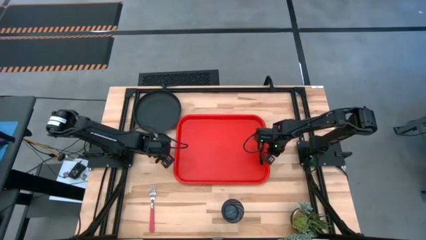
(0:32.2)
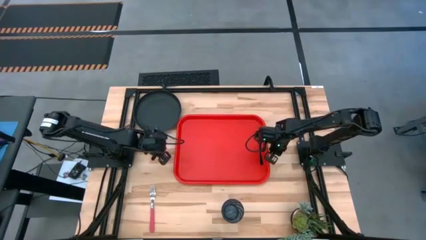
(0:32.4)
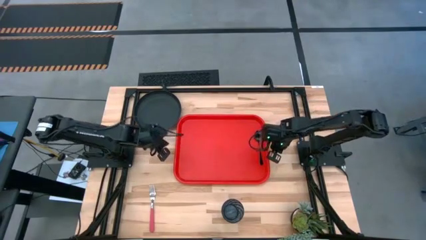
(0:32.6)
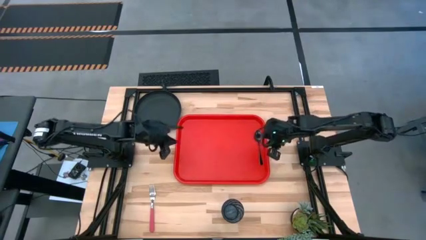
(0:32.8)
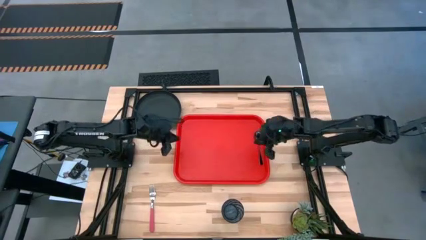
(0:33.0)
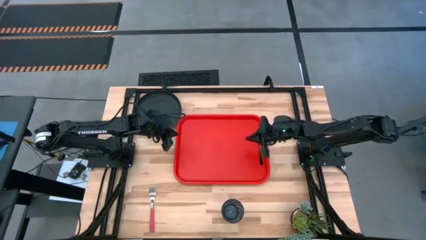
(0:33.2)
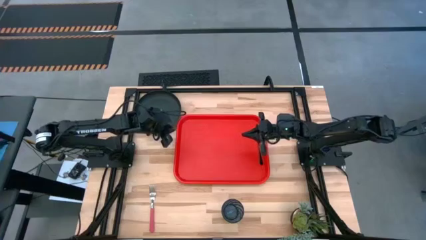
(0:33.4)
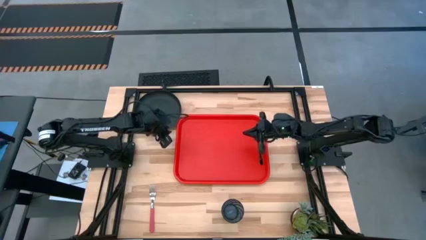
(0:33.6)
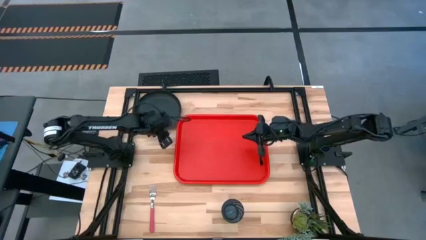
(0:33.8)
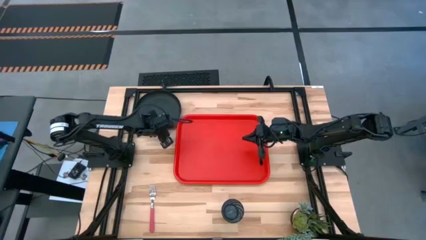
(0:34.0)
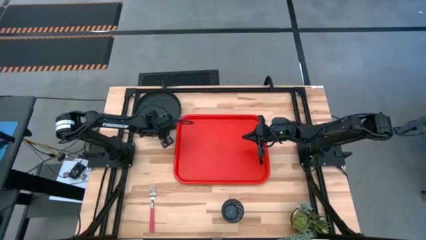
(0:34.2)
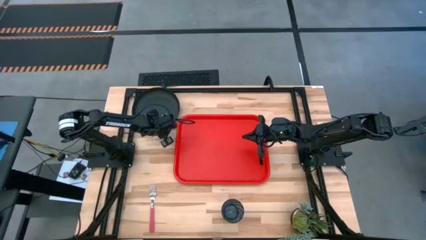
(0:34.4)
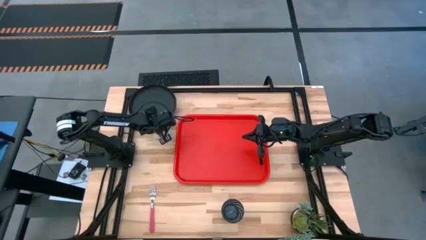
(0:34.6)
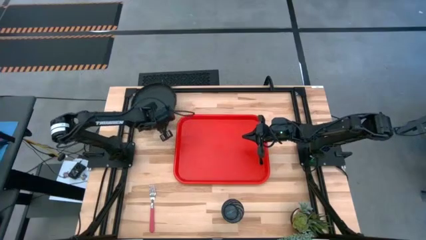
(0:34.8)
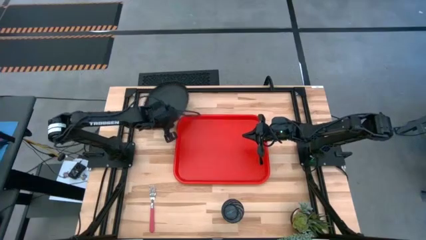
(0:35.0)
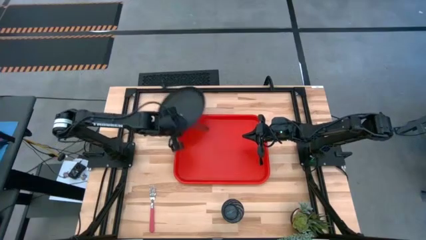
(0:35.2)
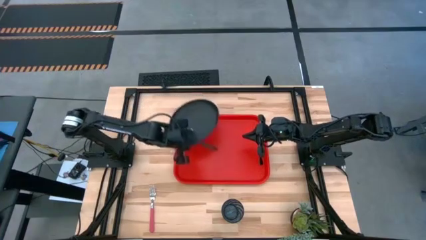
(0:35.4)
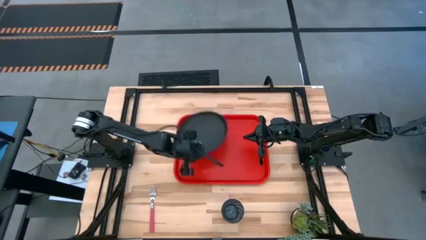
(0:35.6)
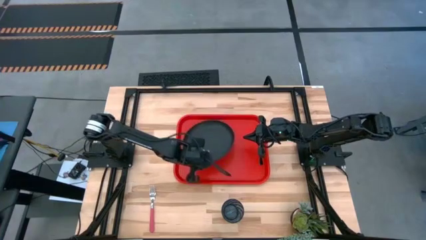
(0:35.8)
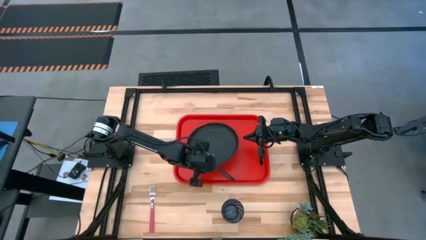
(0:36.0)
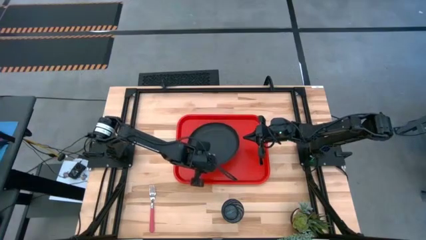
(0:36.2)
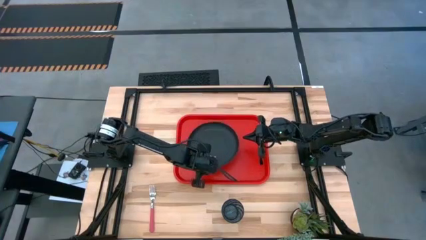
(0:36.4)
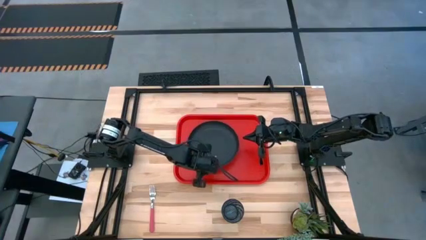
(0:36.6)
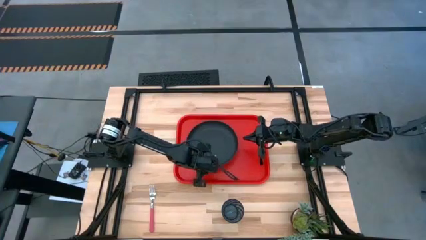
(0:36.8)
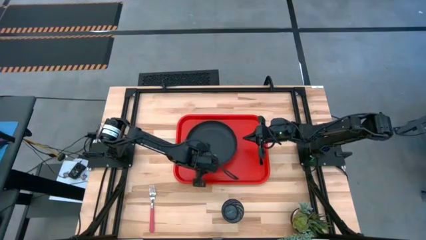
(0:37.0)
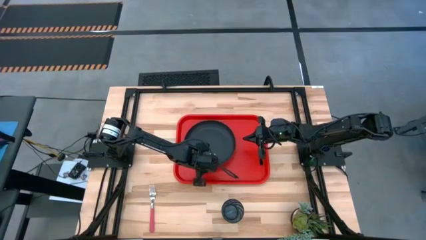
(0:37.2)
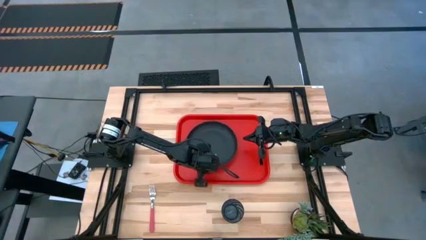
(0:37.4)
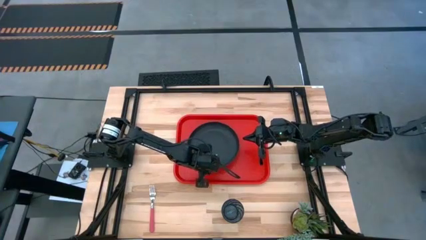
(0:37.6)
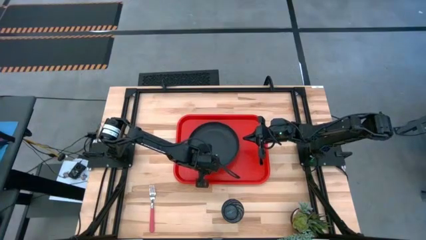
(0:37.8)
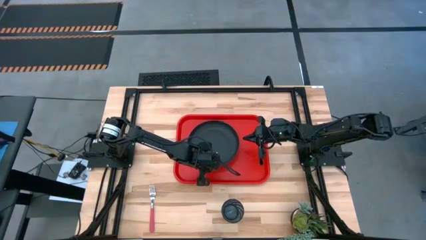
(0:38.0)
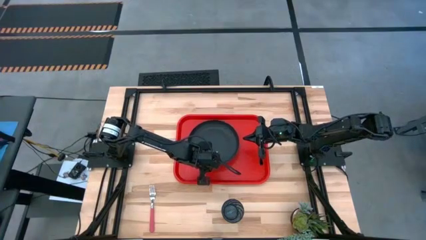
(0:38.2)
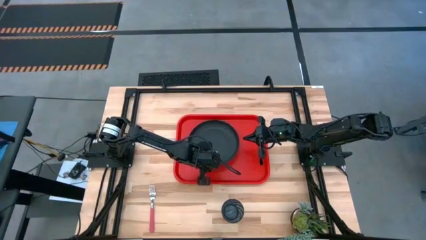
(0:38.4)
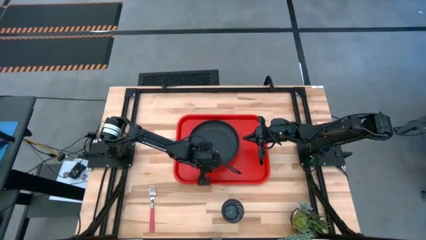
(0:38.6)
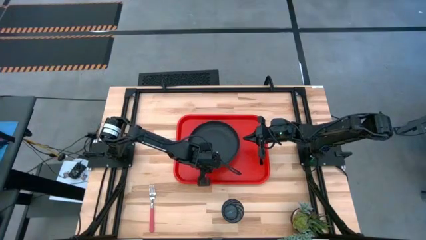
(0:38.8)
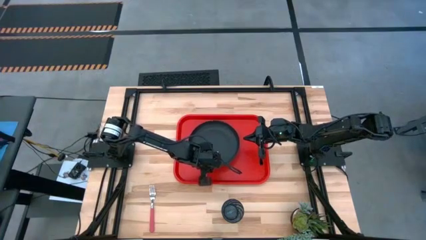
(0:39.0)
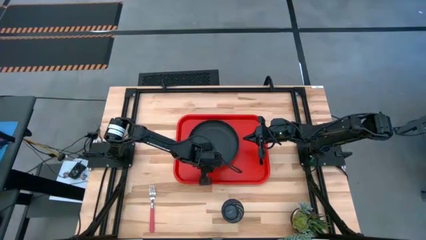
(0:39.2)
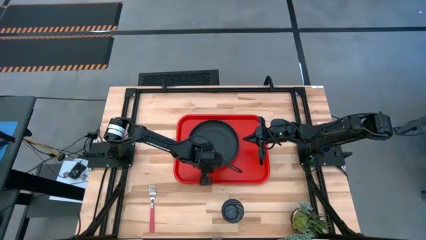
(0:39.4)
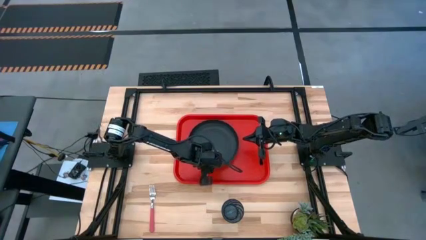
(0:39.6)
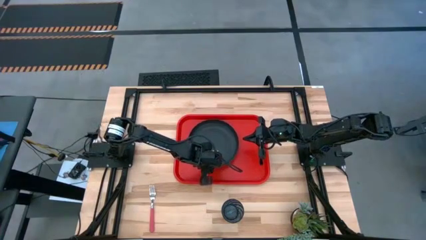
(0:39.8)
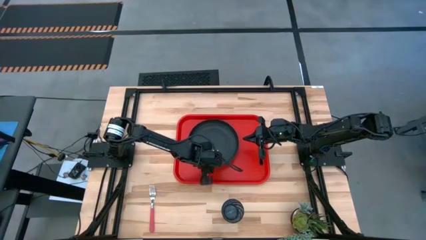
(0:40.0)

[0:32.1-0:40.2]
Task: Pick and place plate/cup/fork/spoon on tray
Put the black plate in the center of the red serving tray

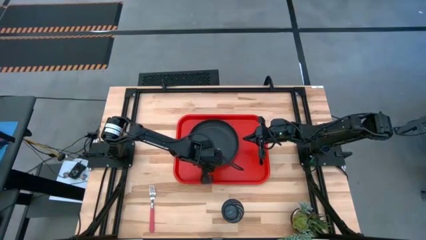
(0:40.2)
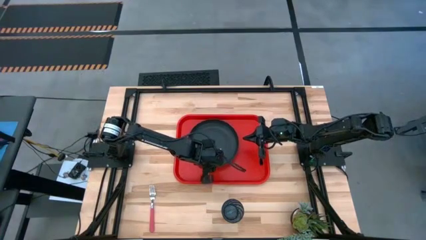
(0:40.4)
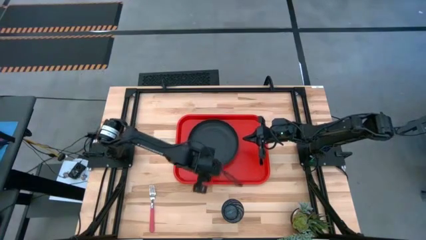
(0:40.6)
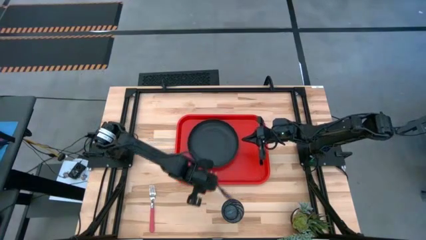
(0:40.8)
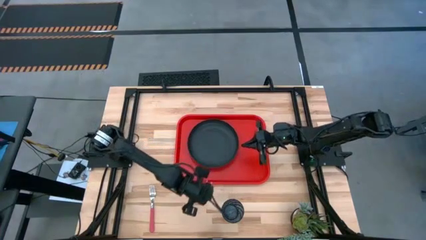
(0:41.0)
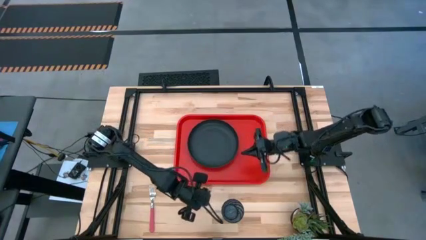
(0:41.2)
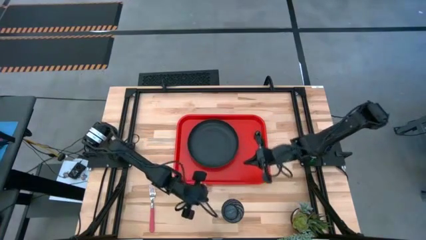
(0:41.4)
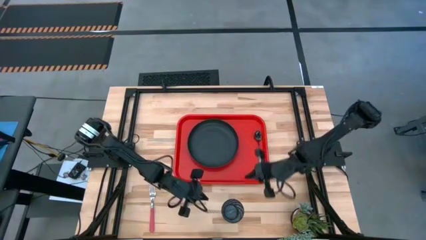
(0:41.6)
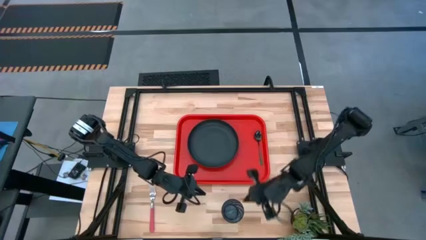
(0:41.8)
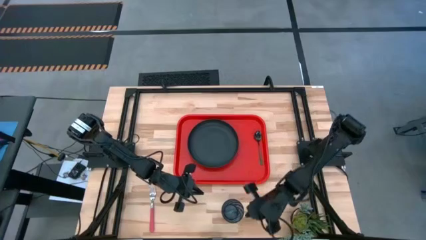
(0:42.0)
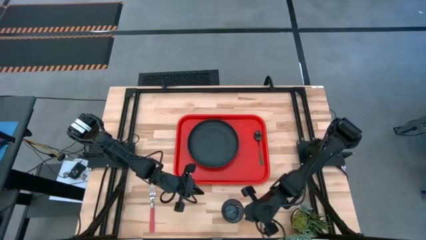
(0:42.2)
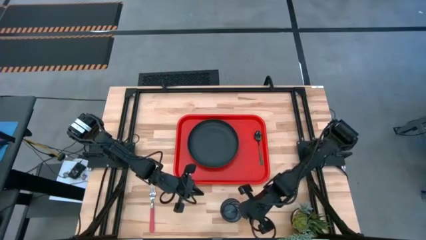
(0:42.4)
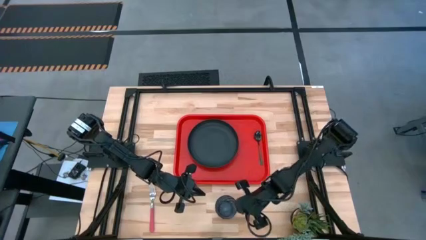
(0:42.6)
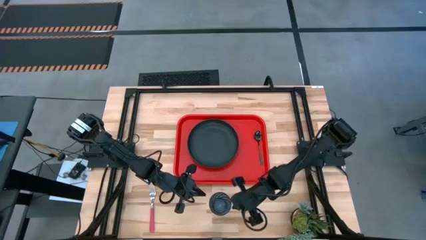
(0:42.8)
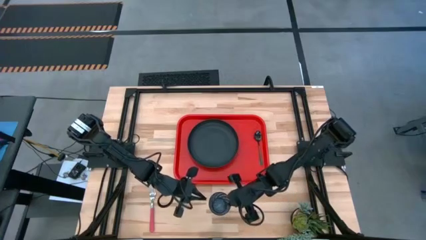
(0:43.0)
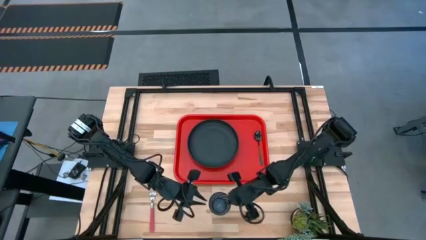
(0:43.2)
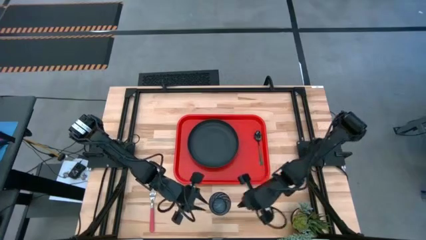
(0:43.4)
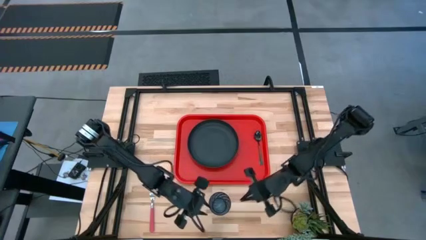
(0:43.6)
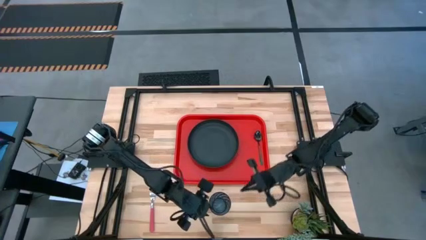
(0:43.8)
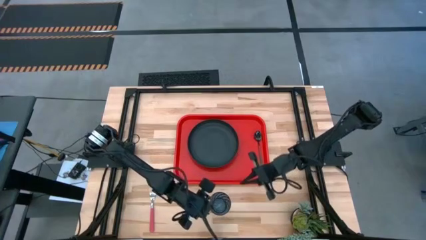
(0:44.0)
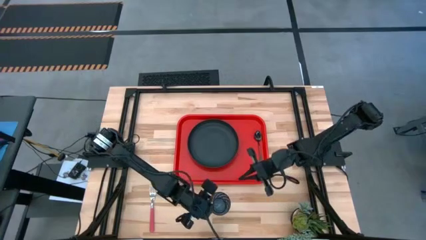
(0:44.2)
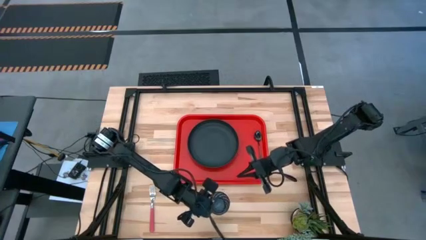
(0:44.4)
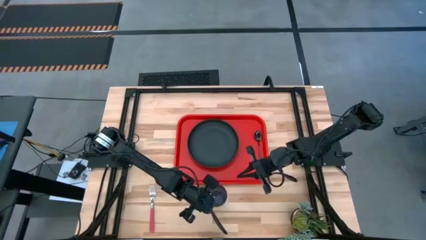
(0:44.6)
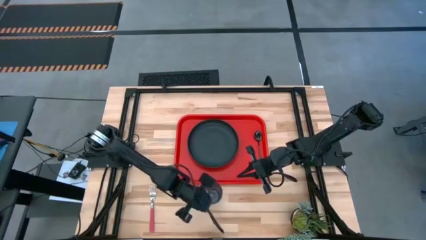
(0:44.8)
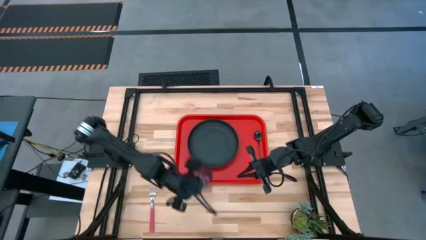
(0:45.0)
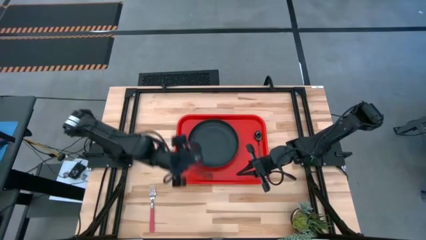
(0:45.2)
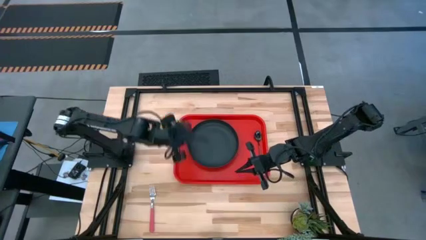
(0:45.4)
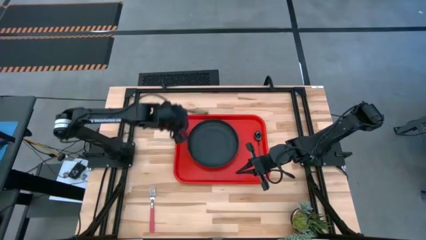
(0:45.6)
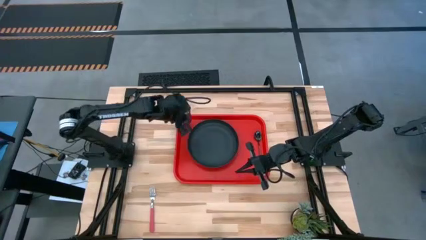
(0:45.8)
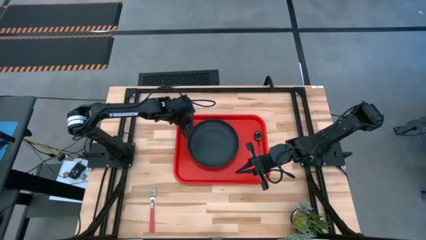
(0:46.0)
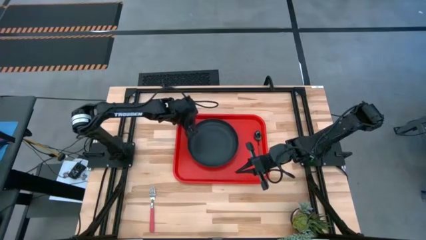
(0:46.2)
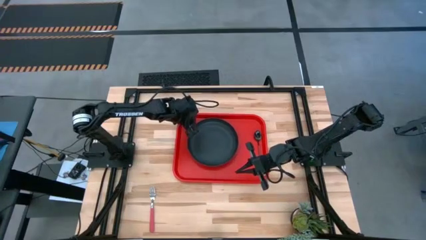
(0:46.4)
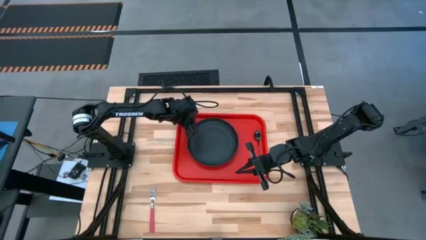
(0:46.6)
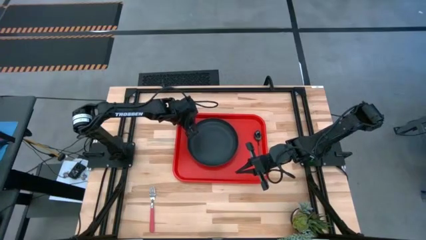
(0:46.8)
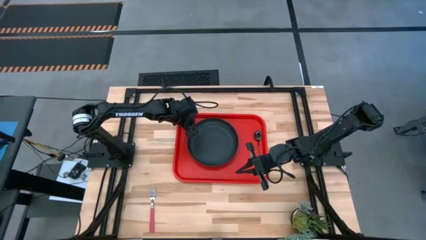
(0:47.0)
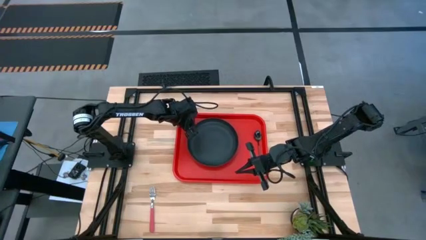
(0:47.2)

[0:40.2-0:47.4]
Put the blue cup to the top left of the black plate on the red serving tray

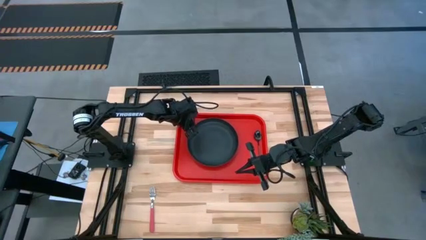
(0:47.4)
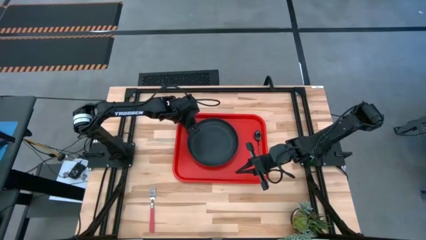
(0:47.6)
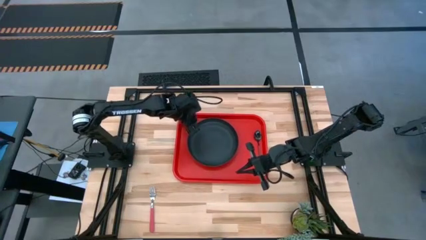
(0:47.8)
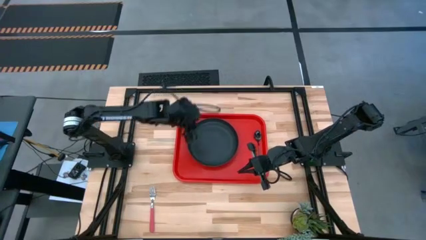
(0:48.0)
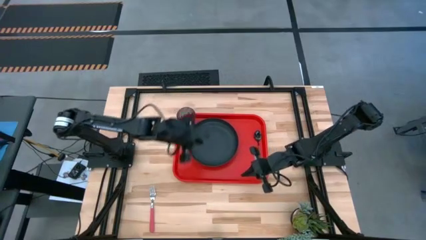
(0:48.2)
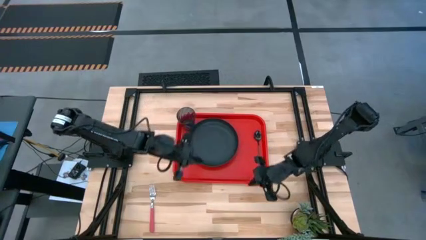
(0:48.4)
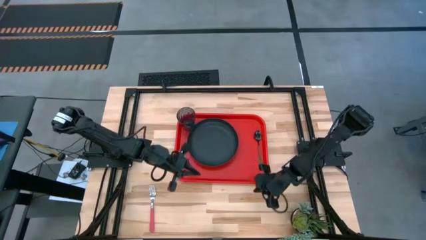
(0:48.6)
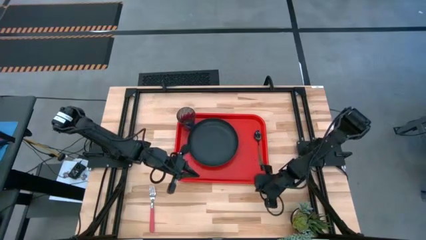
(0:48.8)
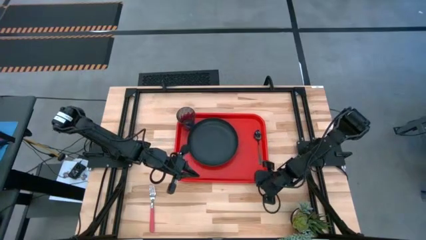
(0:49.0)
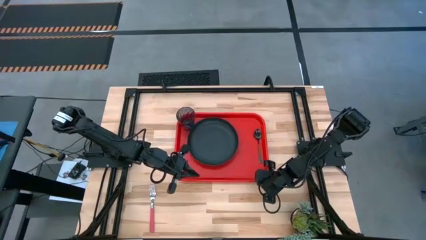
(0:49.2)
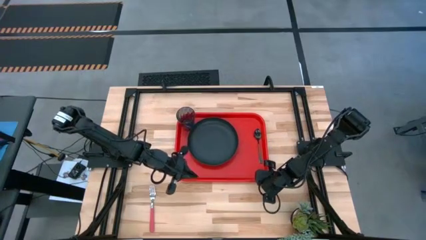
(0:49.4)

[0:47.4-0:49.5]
Adjust the red serving tray
